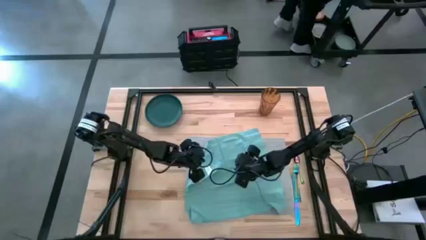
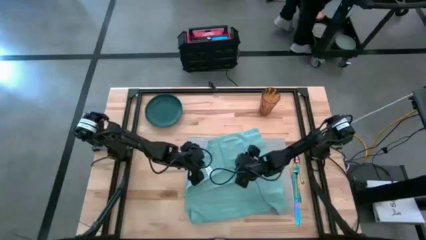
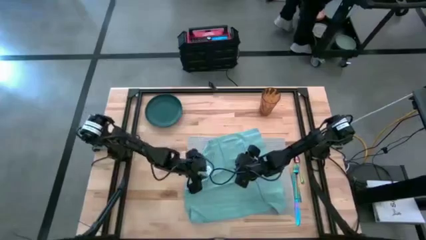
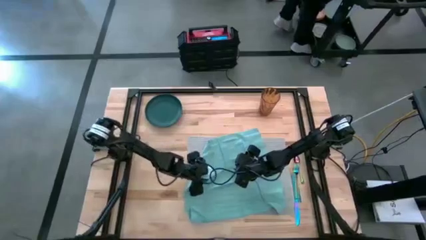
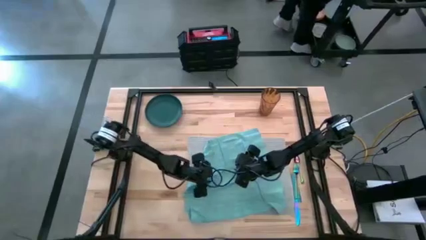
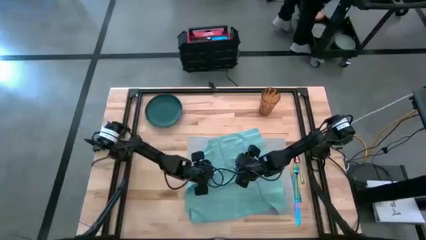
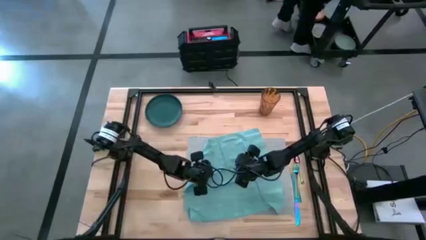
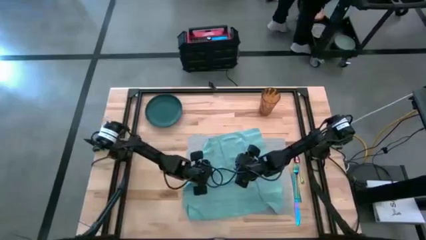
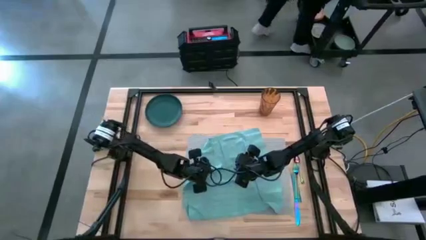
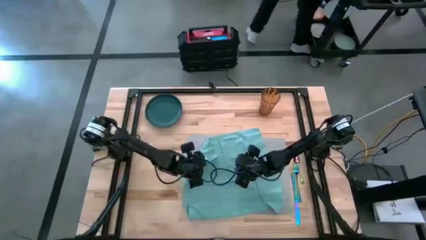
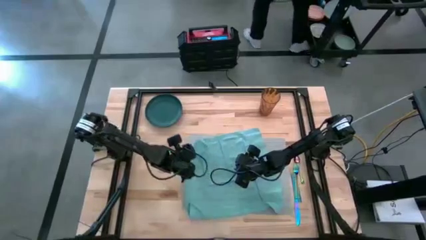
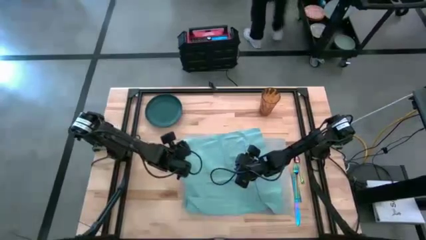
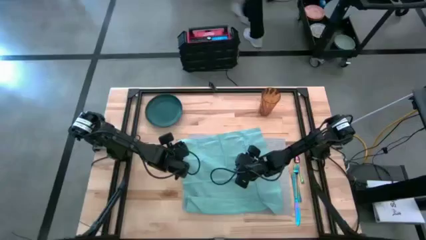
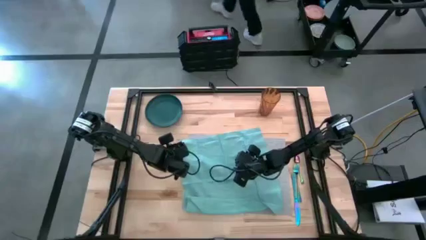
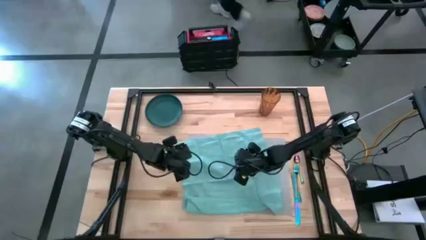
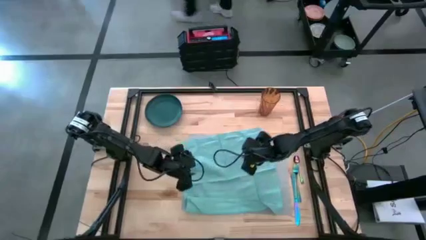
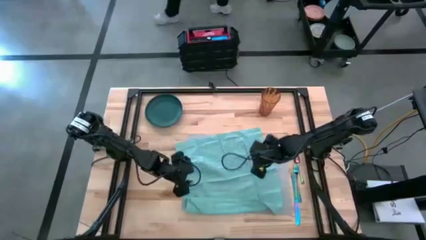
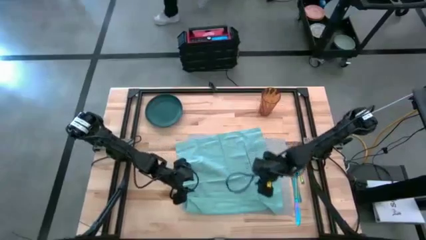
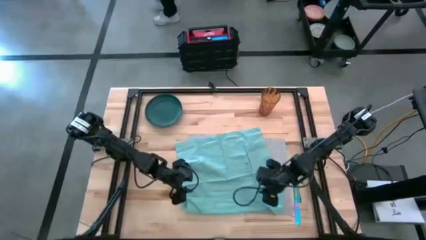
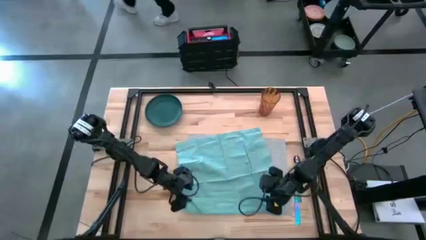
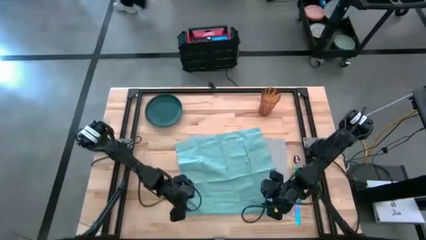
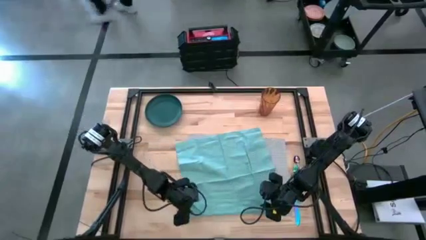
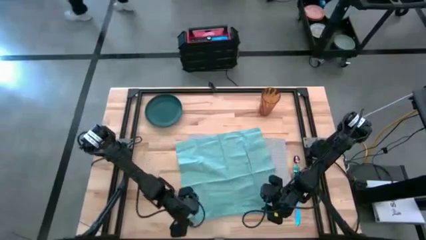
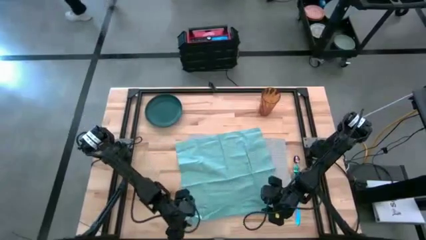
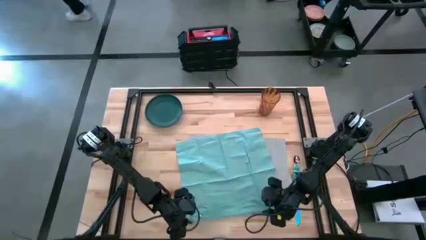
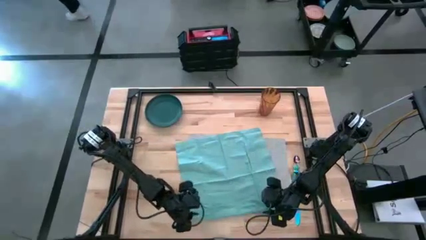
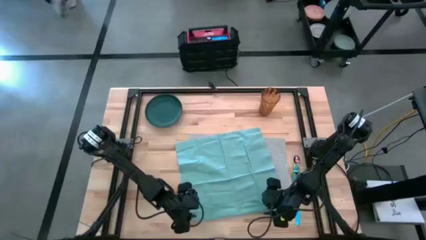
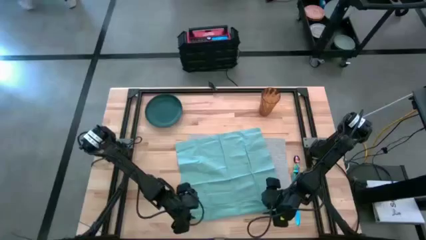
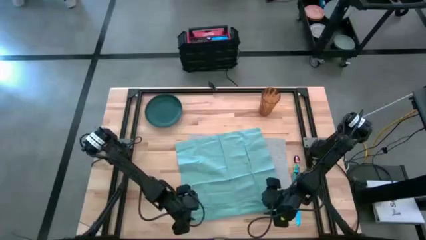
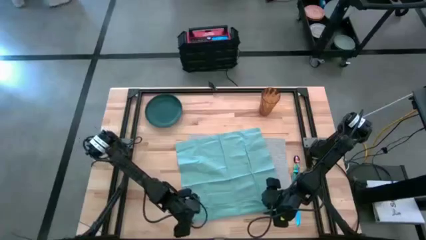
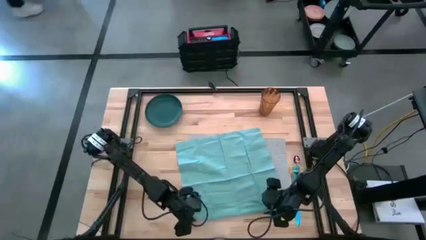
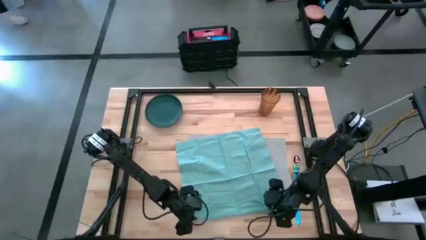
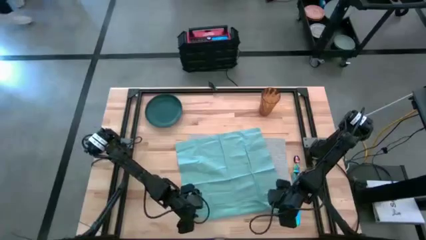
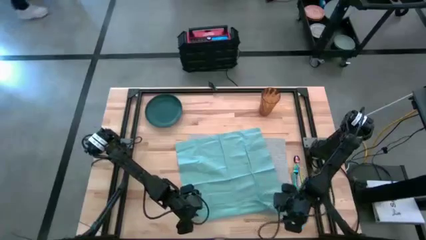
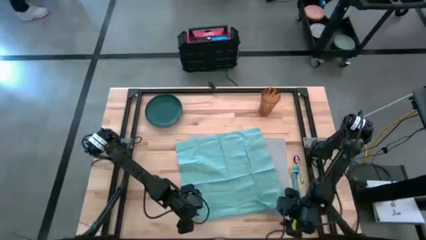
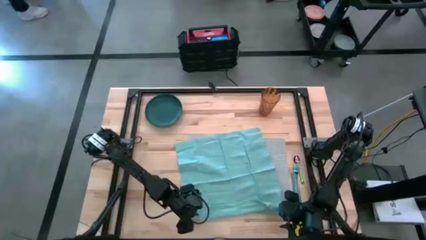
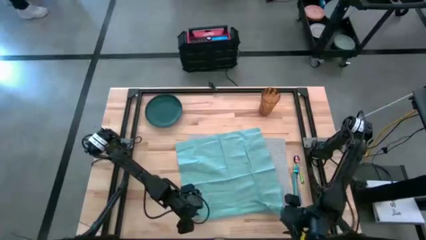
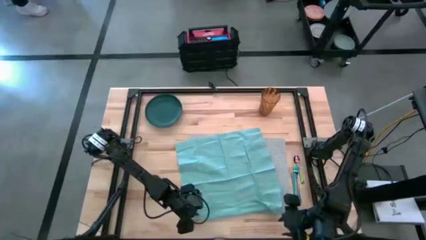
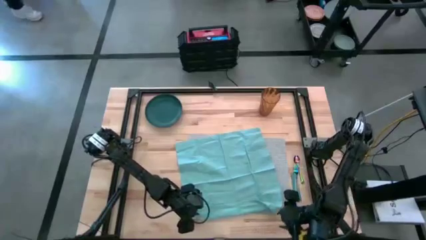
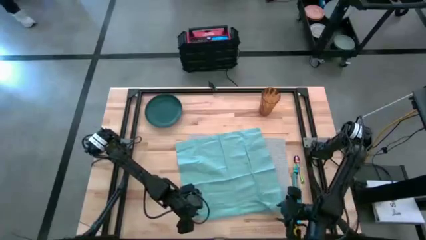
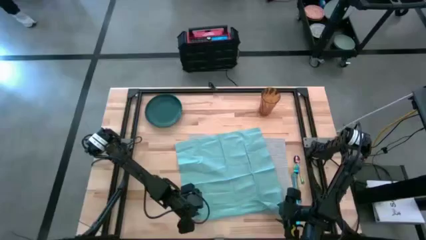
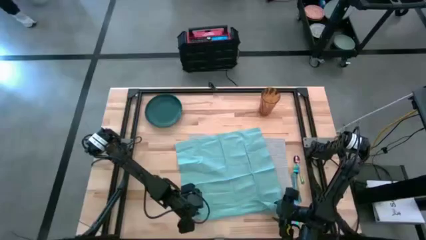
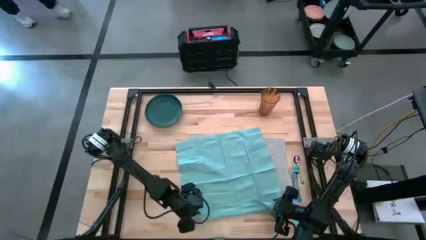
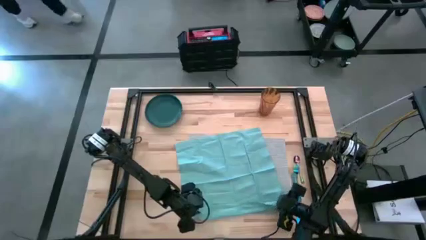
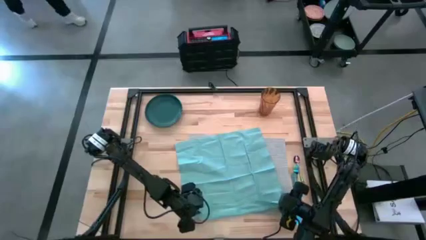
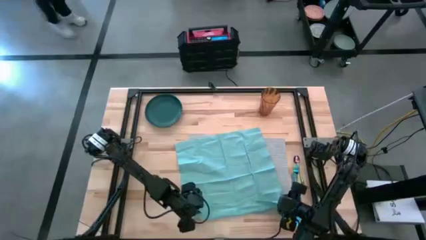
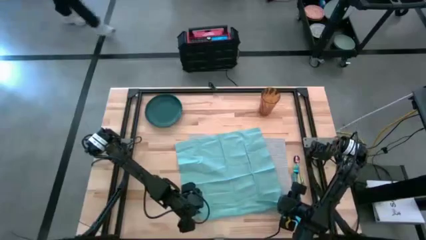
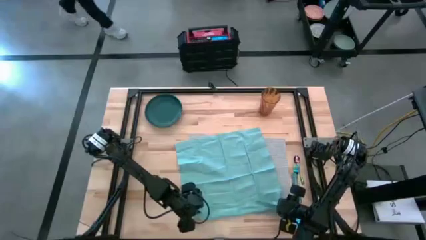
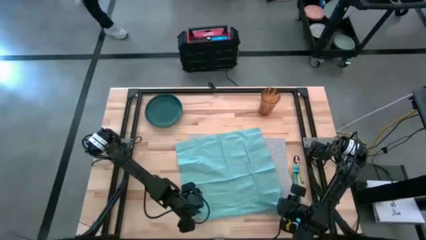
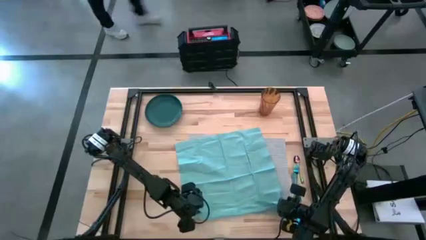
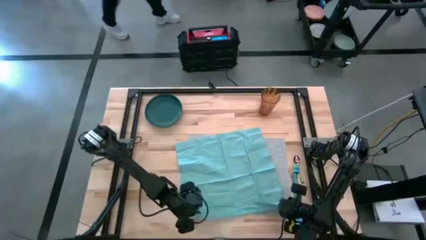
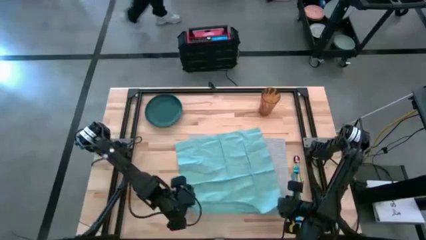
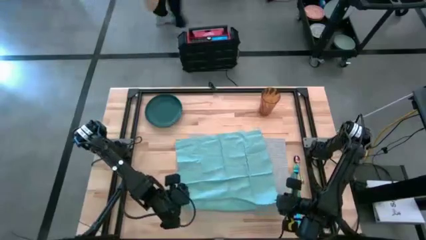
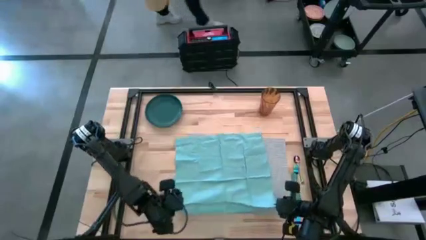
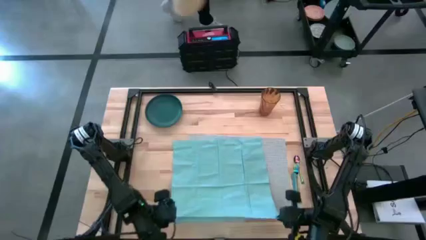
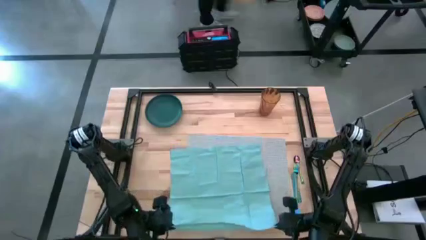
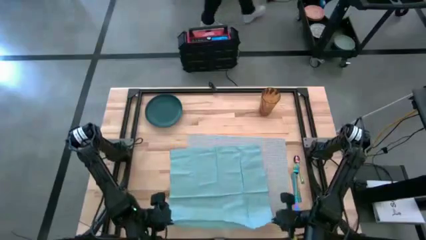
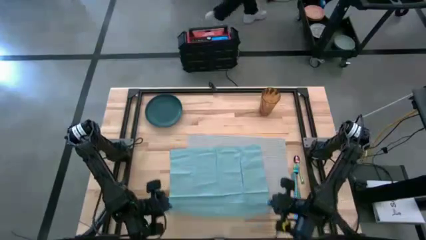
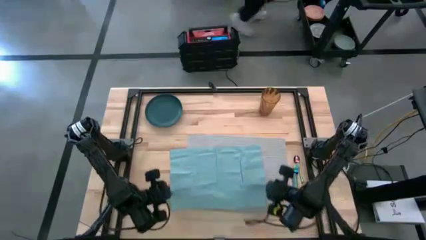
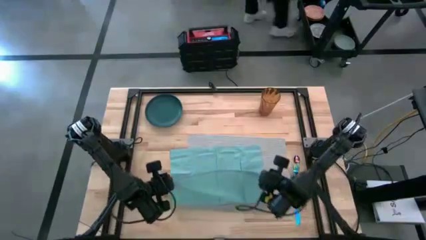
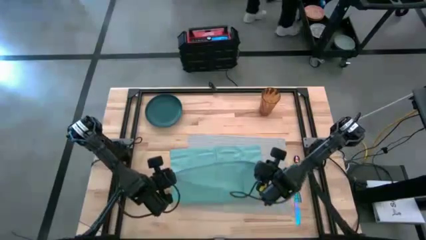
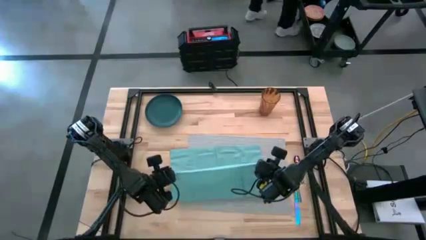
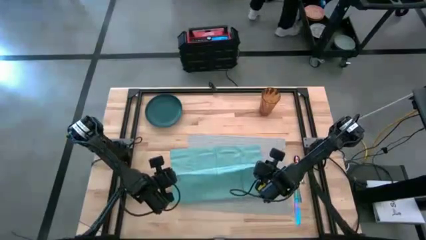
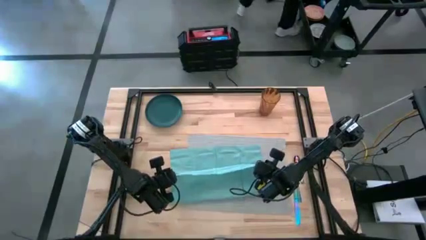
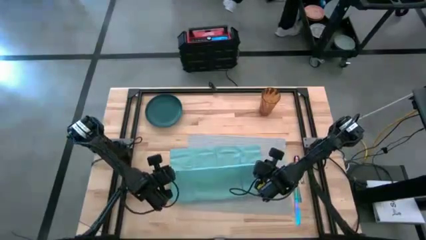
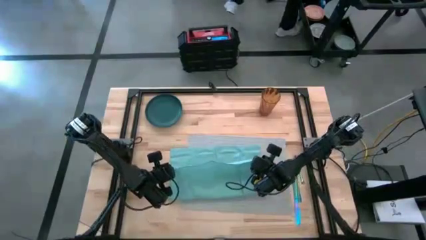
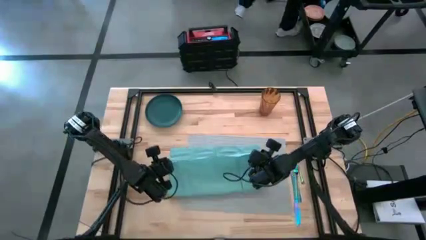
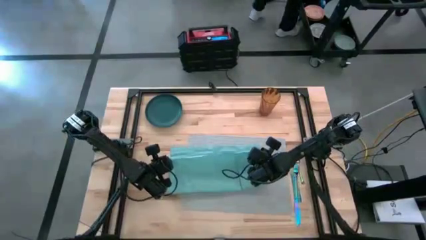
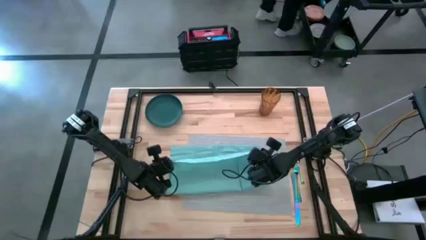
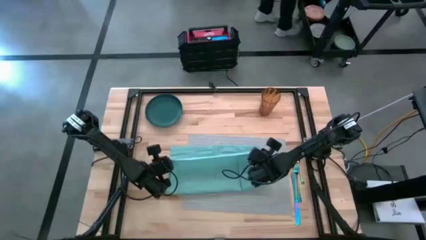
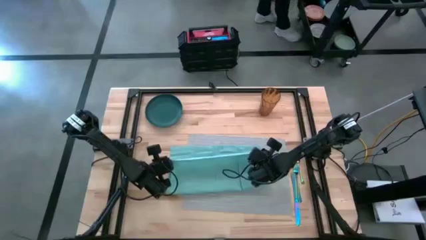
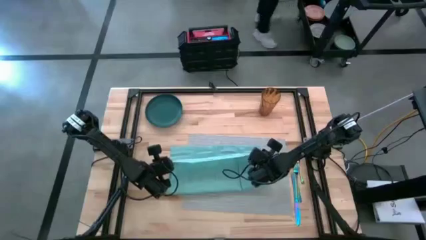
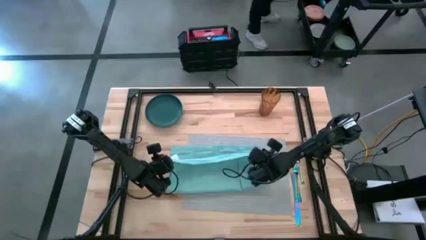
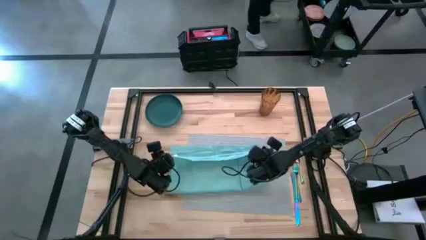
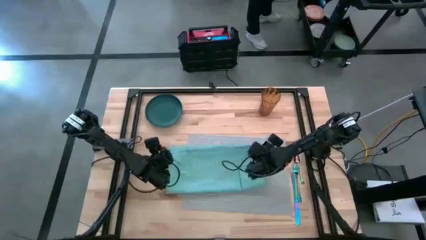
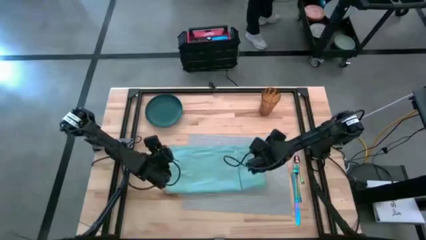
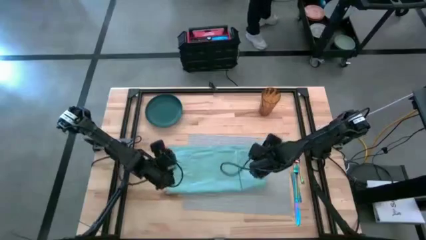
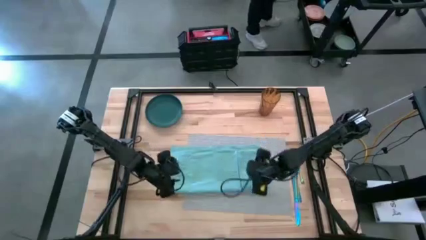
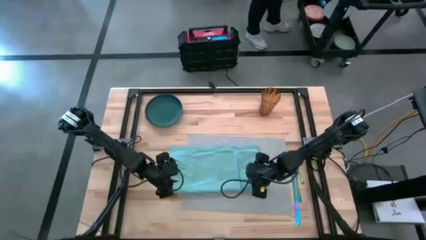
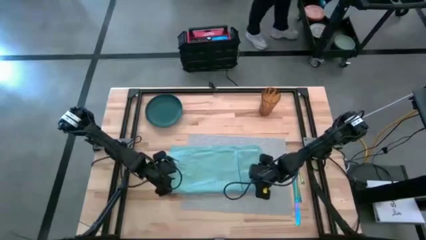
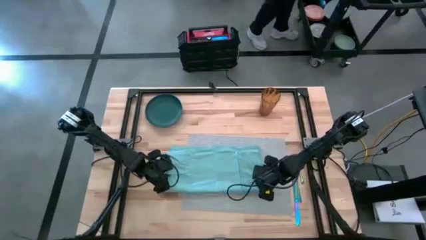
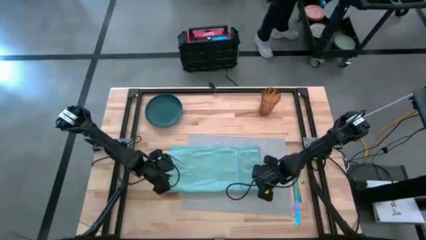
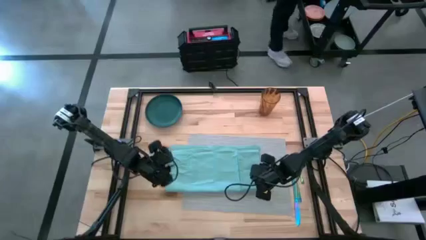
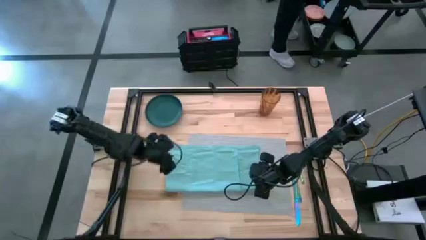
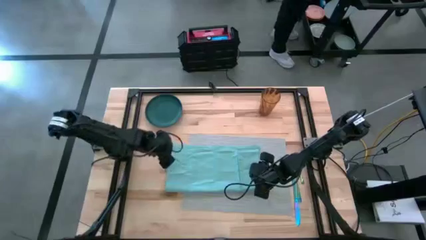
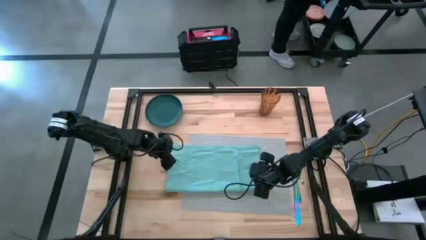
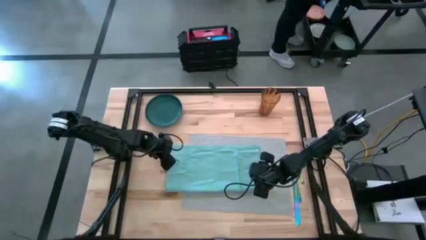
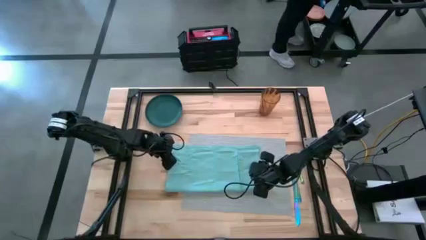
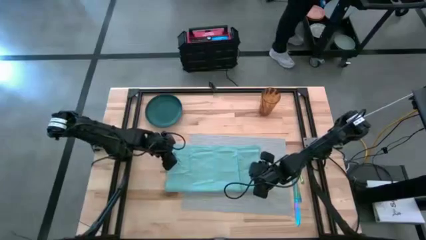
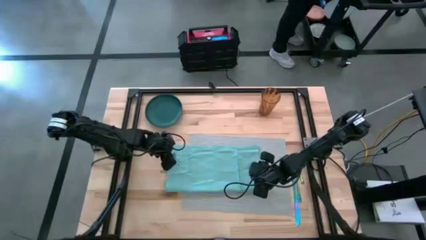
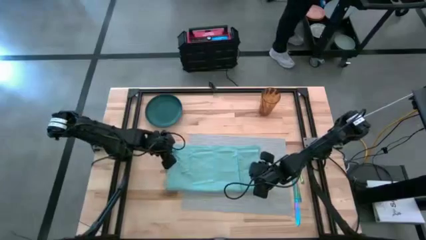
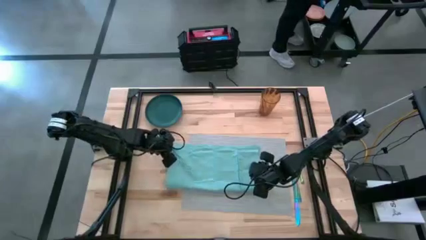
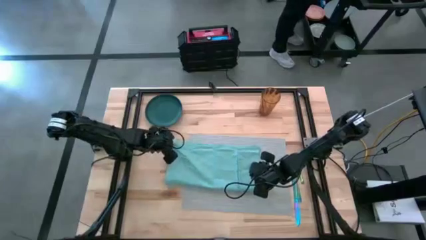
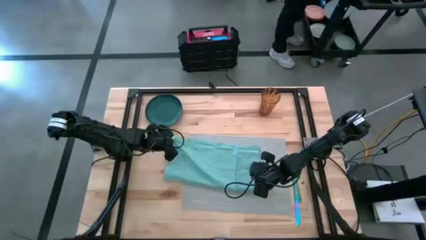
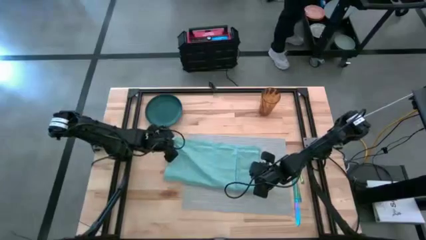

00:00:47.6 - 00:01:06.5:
Task: Set table place
Fold the light blue table napkin
